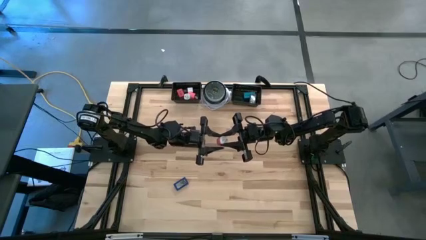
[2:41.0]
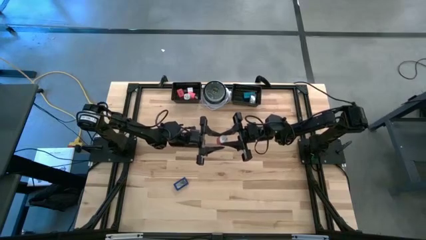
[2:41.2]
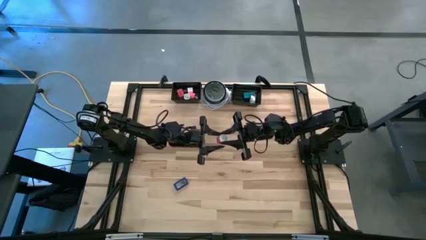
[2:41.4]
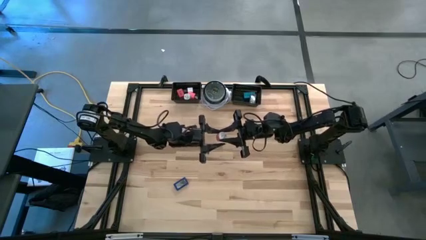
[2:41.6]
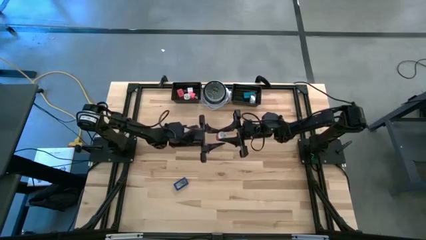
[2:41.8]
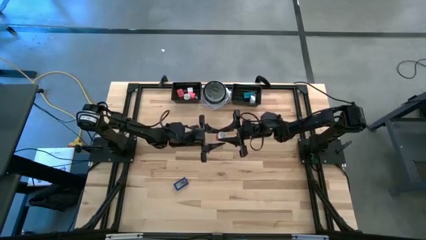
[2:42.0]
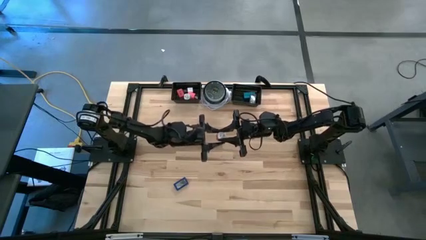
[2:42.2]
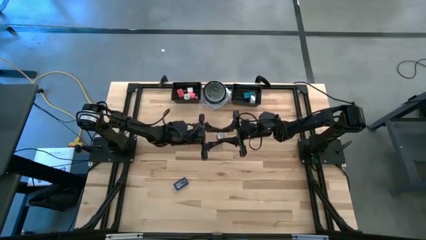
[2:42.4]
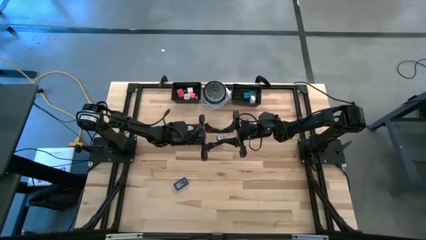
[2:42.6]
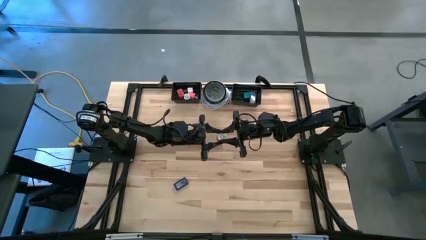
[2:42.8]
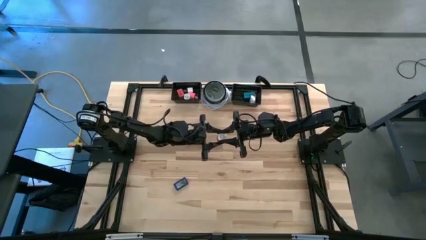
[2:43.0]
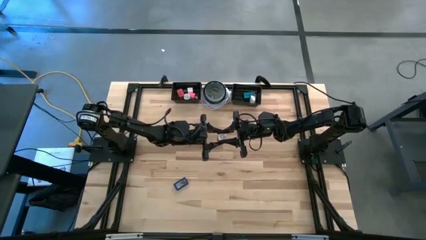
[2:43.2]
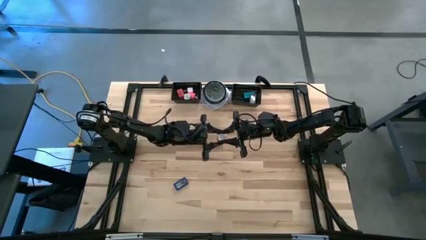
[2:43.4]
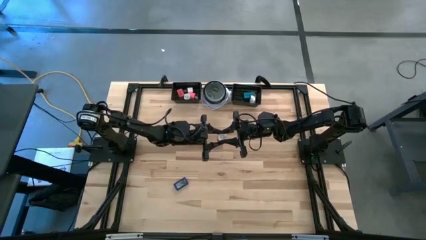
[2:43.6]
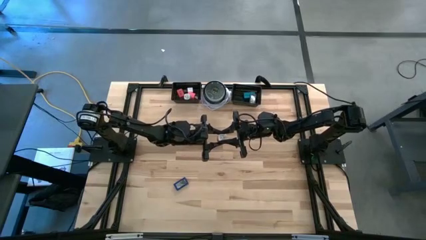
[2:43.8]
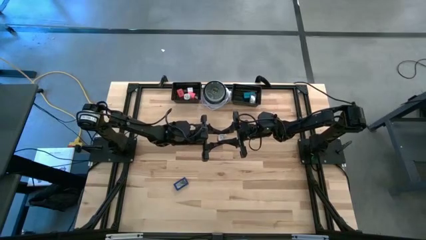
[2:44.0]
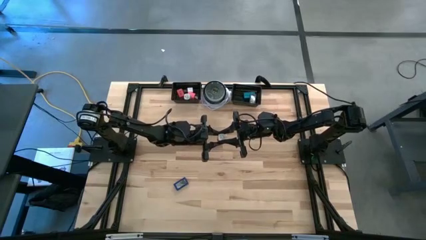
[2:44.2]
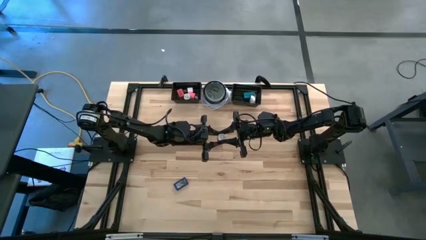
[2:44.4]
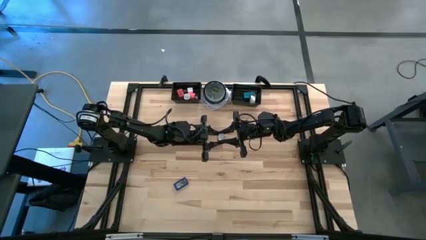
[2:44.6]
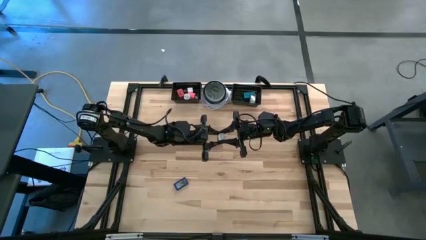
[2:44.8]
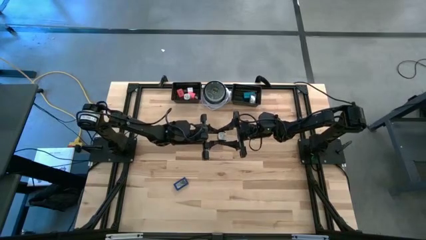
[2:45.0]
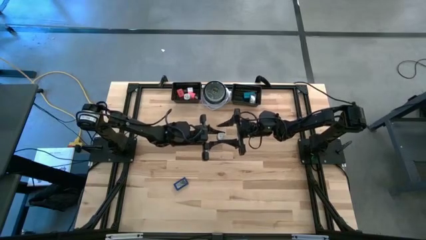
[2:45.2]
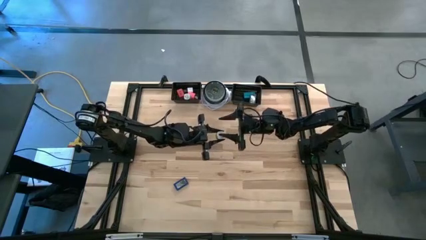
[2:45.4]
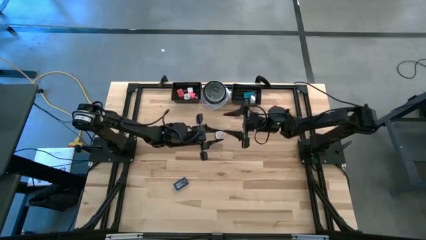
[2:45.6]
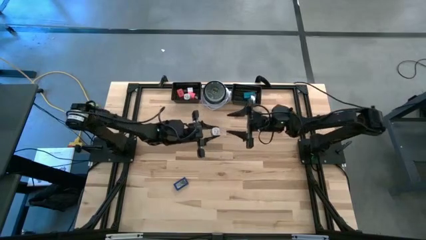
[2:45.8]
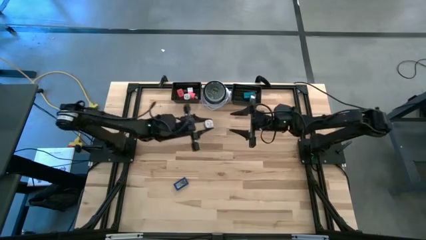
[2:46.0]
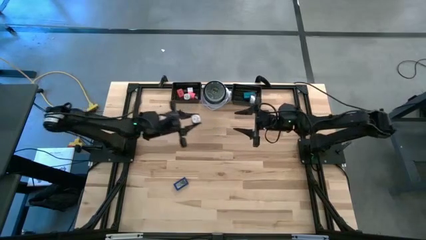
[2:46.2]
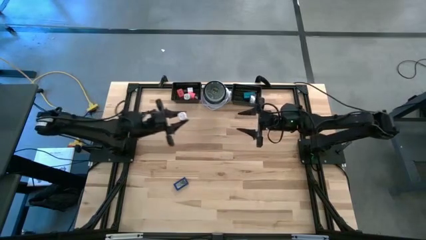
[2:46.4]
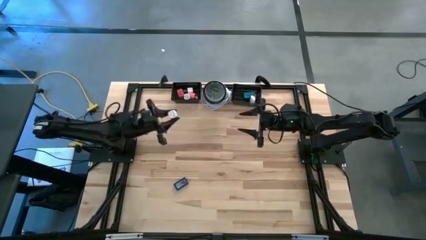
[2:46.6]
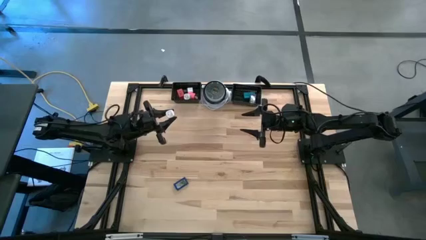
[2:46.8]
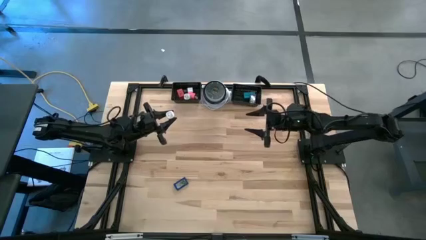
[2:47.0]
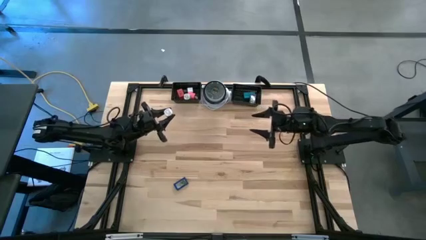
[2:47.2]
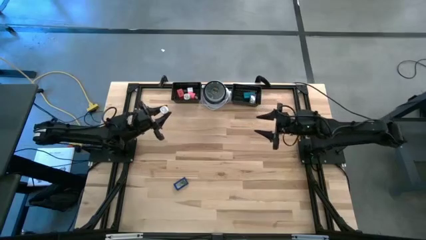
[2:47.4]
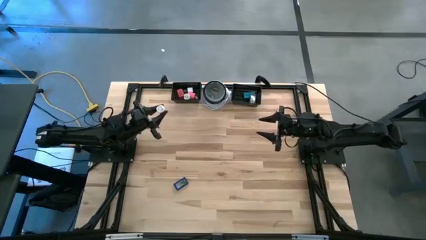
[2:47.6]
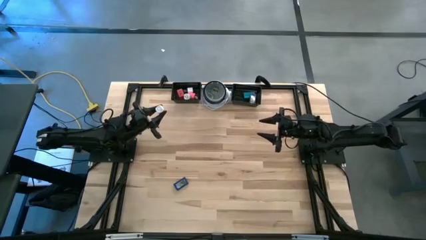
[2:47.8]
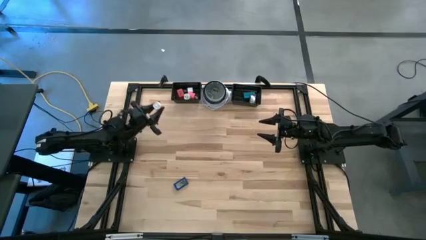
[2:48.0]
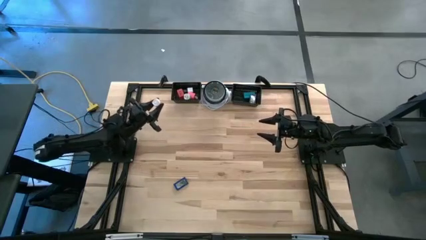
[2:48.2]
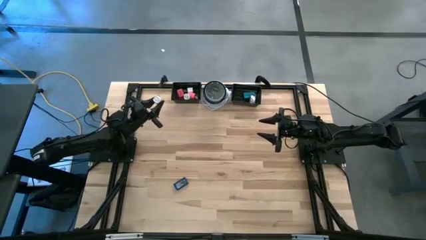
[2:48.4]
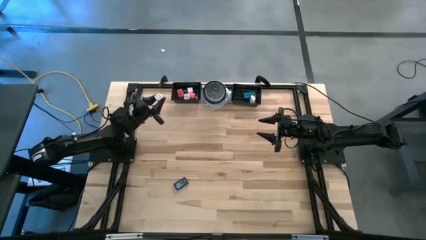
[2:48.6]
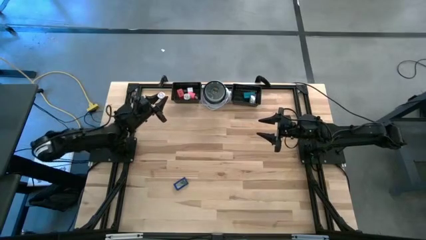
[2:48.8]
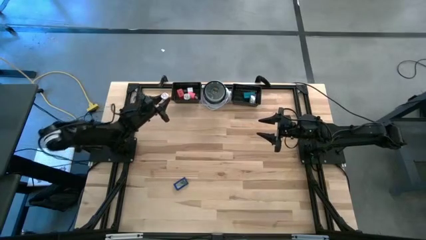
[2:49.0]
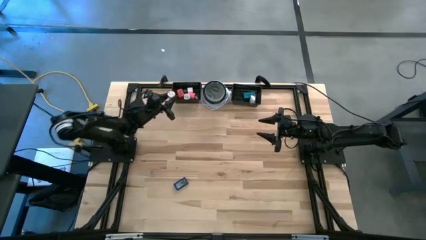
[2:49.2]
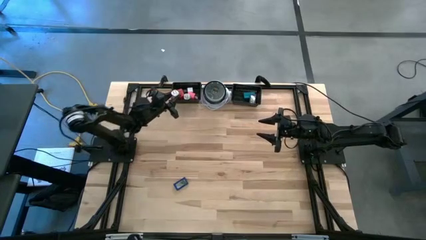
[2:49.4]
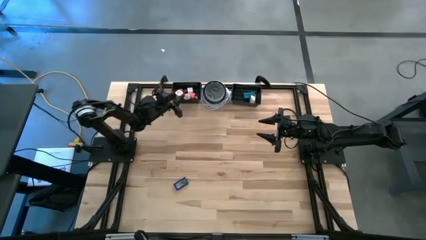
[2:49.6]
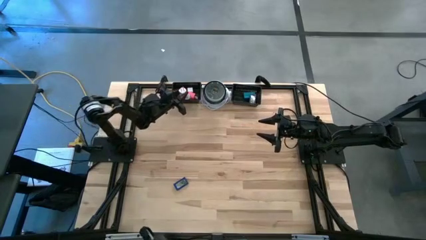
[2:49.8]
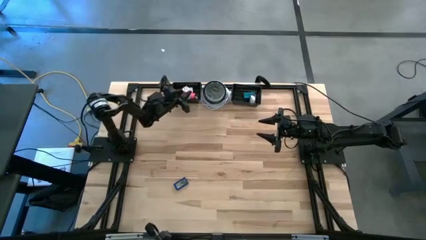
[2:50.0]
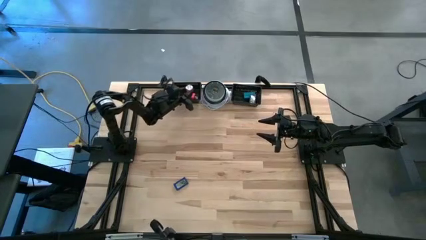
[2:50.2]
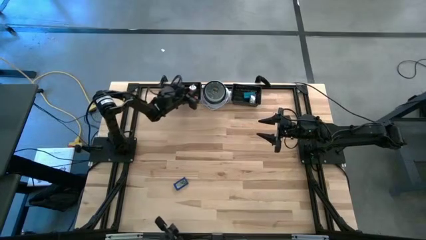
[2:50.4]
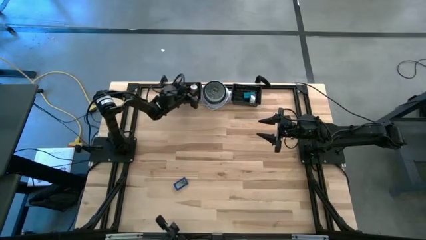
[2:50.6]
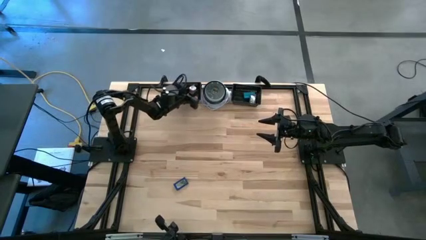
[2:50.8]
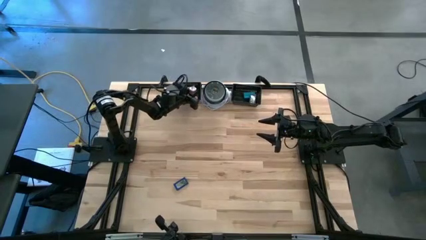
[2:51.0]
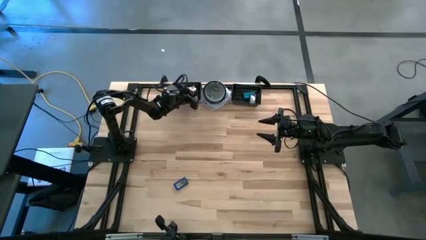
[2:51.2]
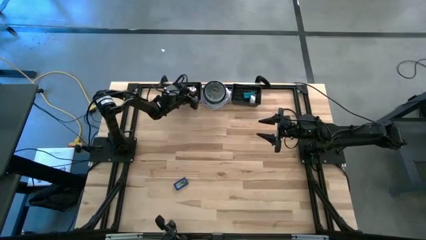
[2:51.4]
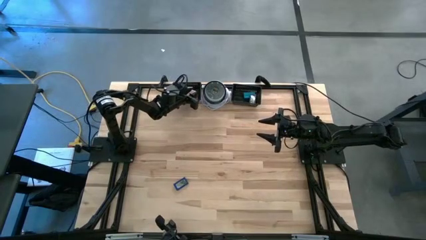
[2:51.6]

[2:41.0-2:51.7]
Task: Pick & Place Office items
Put the pink charger adapter into the left black basket
